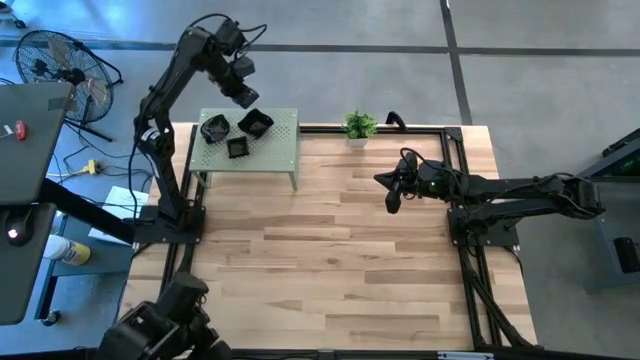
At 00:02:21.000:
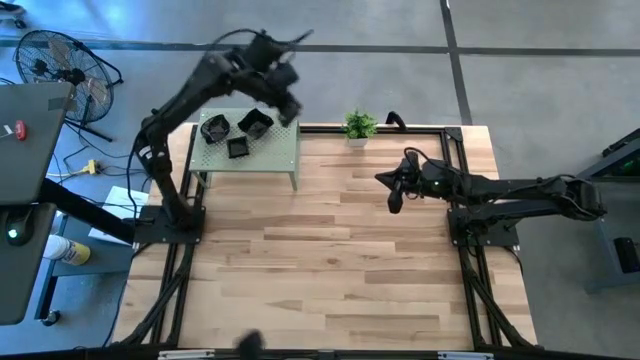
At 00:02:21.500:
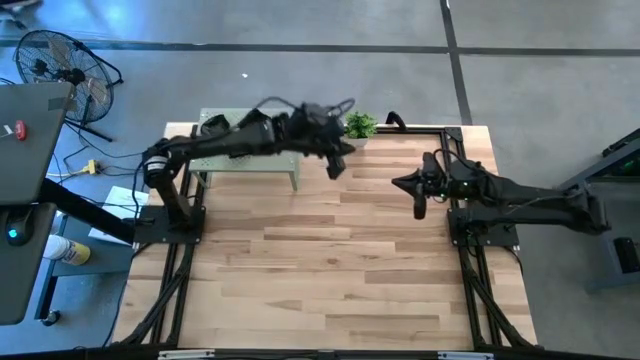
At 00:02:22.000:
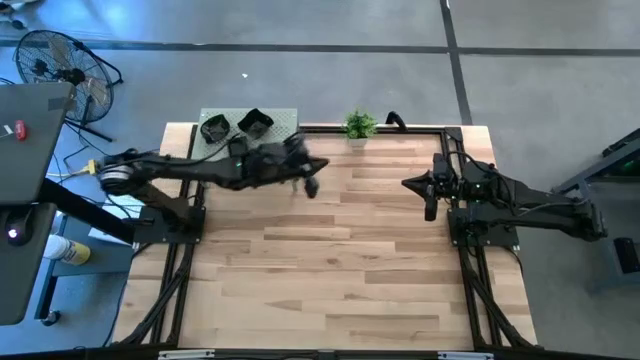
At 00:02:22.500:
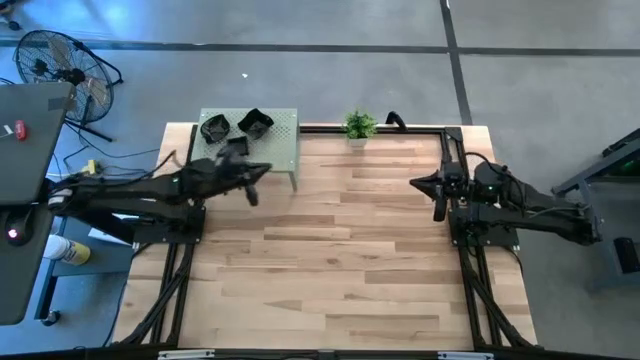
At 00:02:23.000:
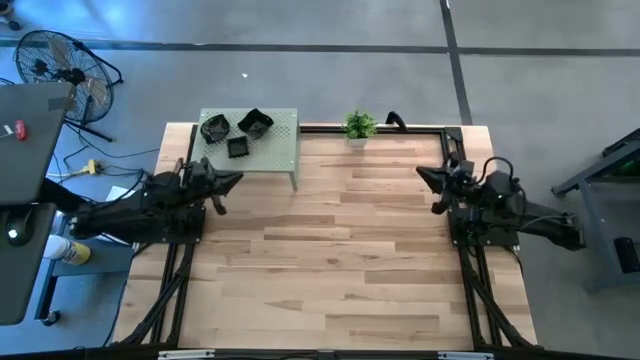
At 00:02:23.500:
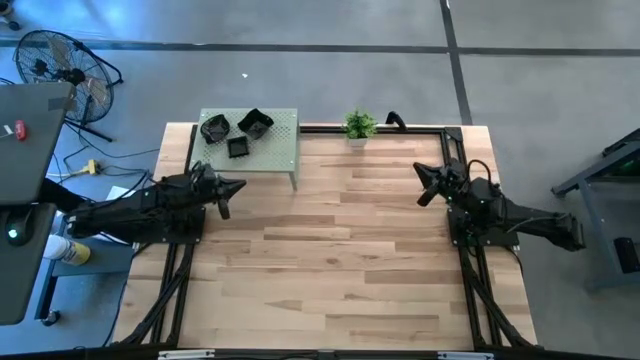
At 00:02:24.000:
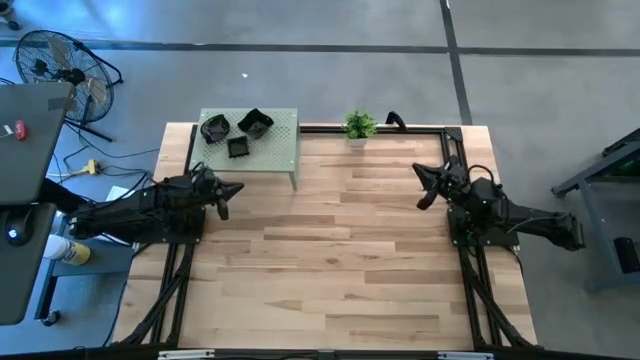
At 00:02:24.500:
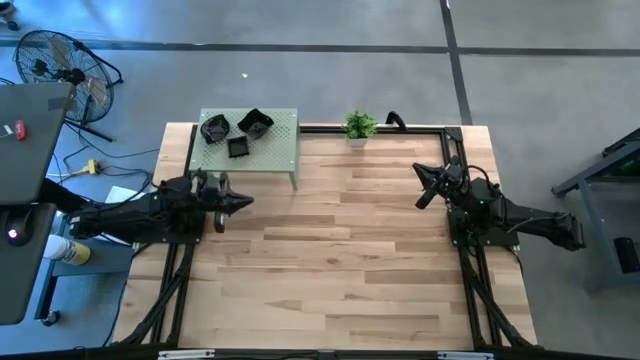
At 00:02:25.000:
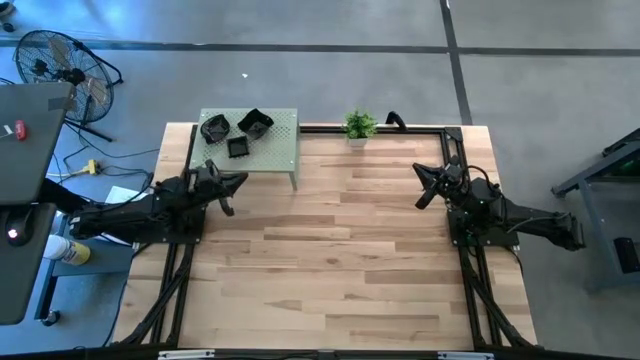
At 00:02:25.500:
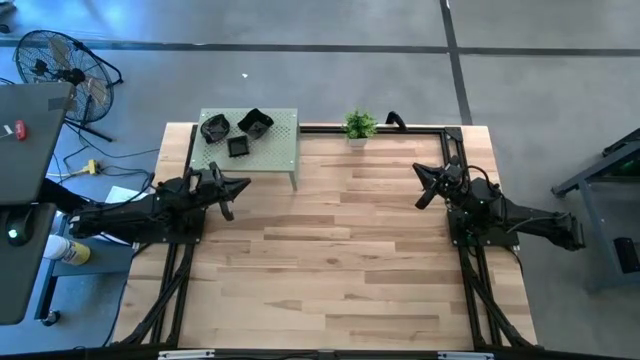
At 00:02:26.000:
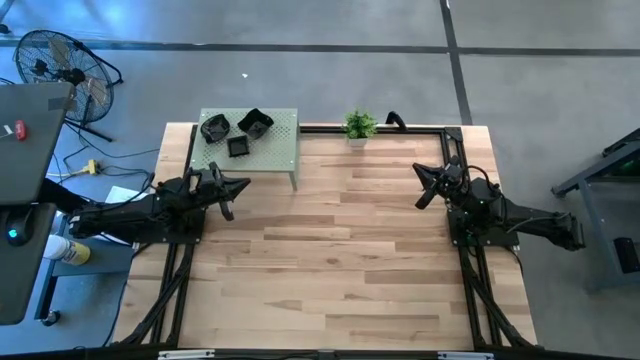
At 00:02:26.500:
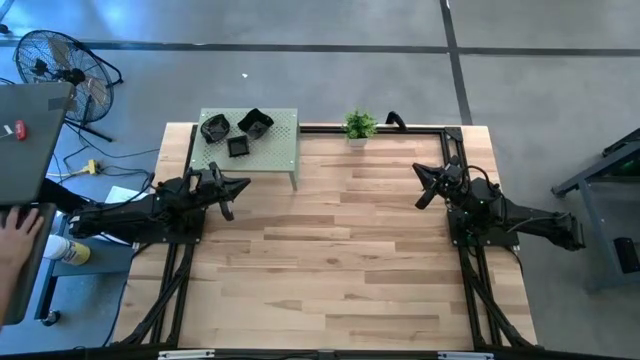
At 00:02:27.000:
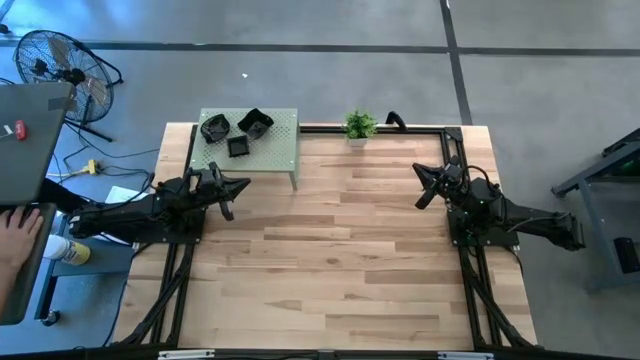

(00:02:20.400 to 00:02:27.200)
Task: Pick & Place Mini shaped plates
Return to Home Position

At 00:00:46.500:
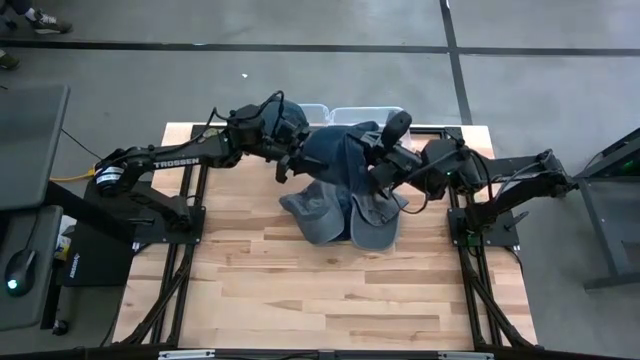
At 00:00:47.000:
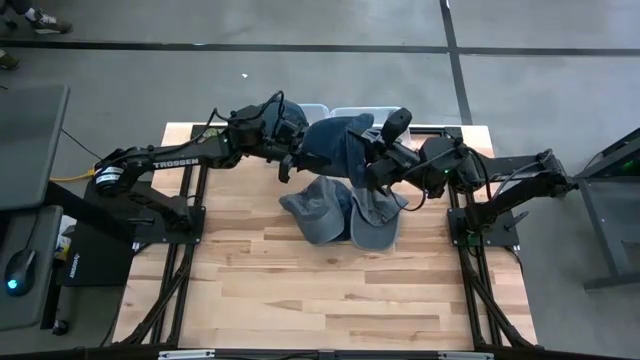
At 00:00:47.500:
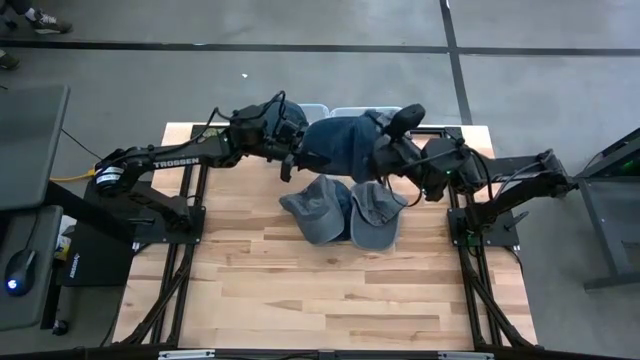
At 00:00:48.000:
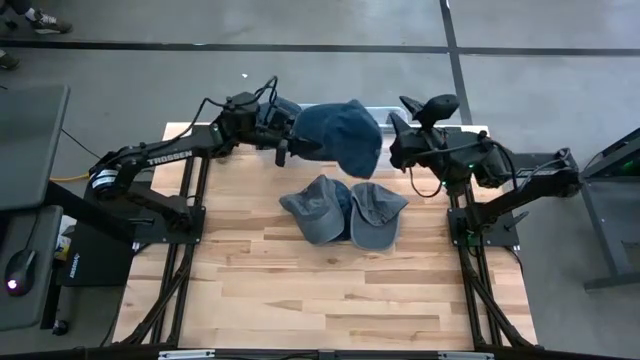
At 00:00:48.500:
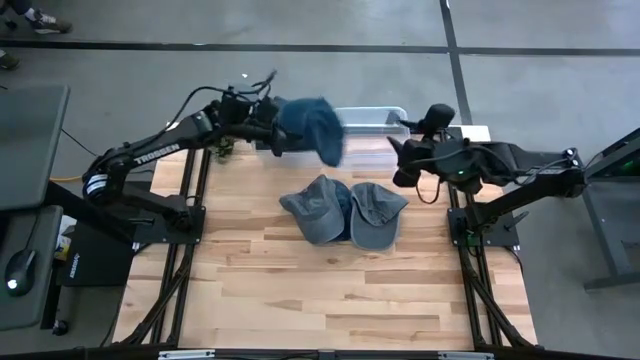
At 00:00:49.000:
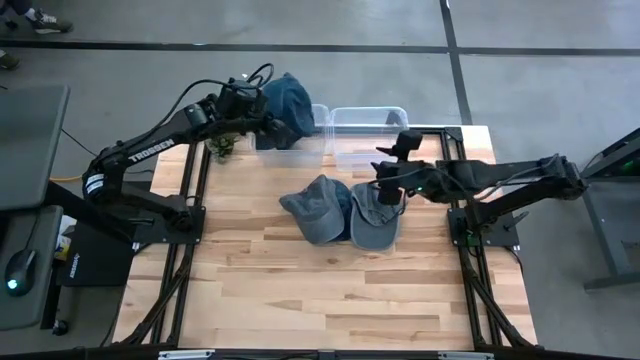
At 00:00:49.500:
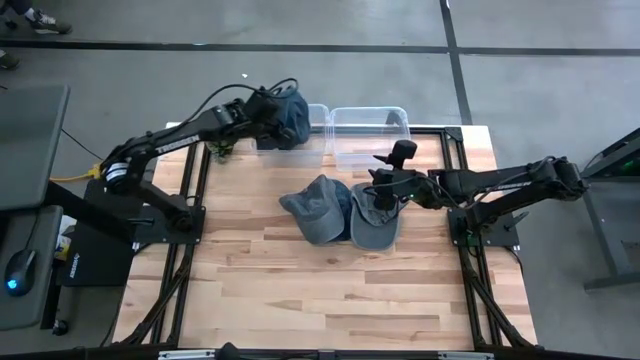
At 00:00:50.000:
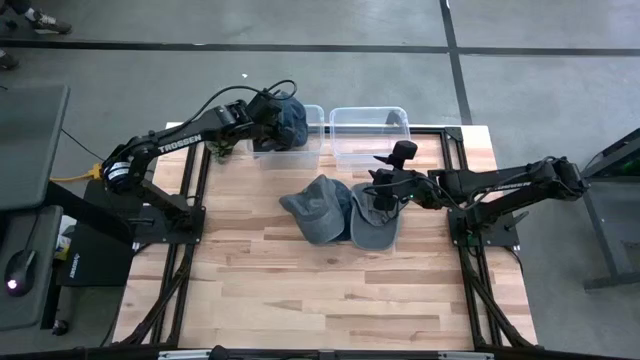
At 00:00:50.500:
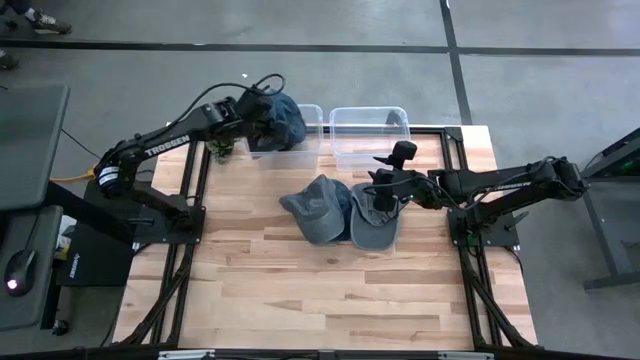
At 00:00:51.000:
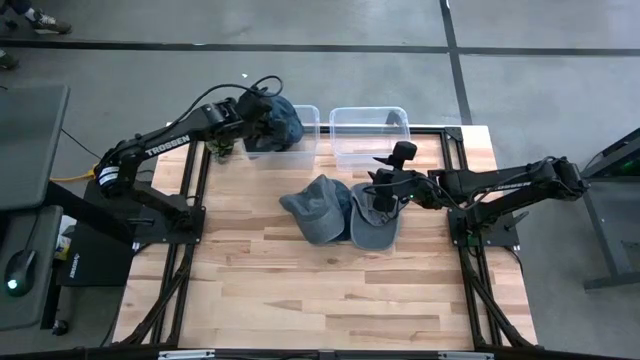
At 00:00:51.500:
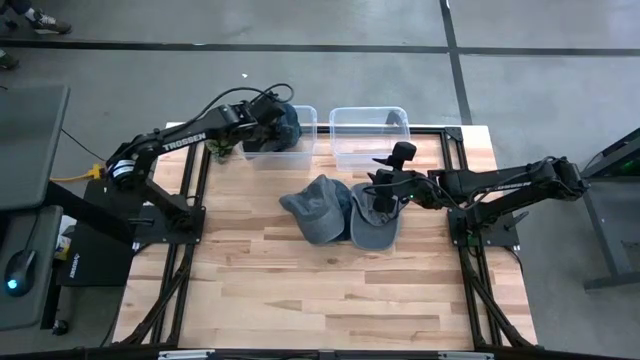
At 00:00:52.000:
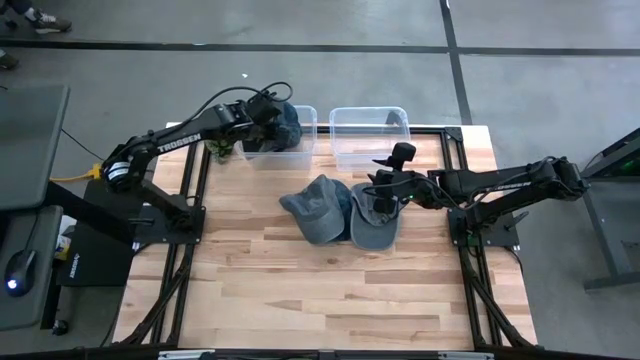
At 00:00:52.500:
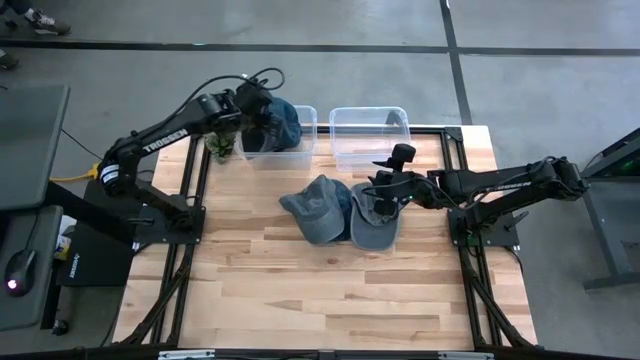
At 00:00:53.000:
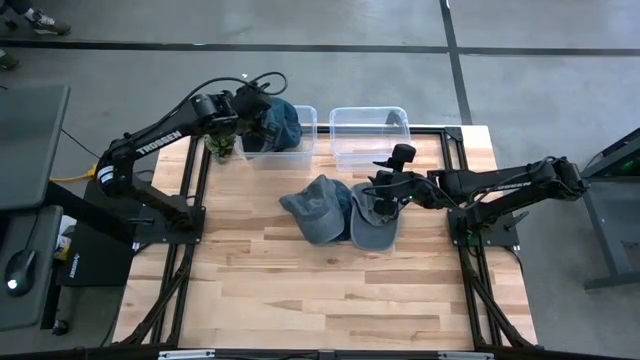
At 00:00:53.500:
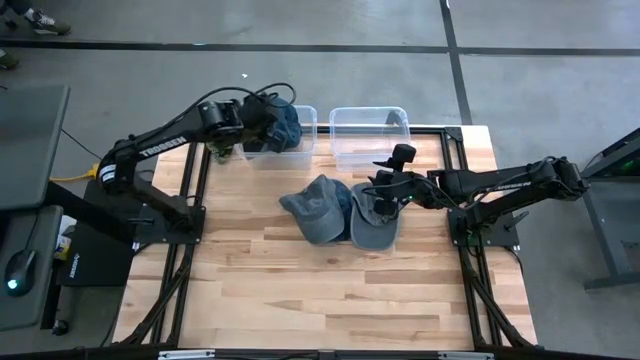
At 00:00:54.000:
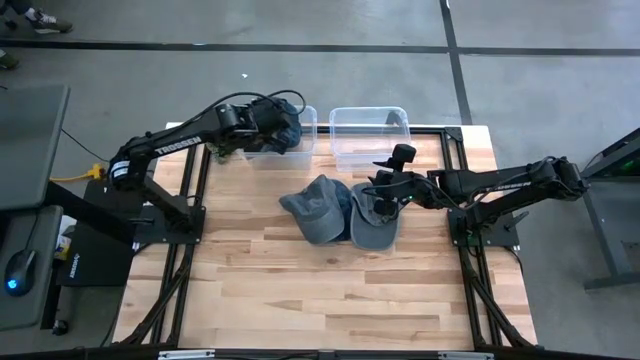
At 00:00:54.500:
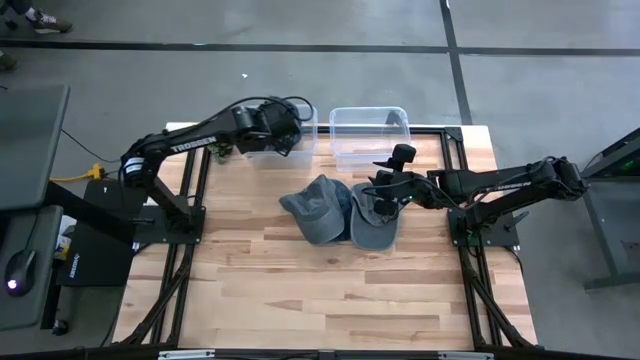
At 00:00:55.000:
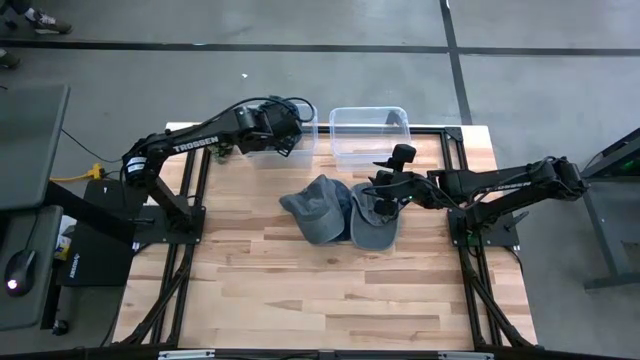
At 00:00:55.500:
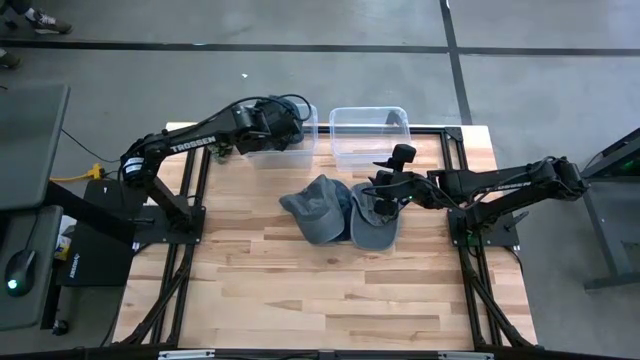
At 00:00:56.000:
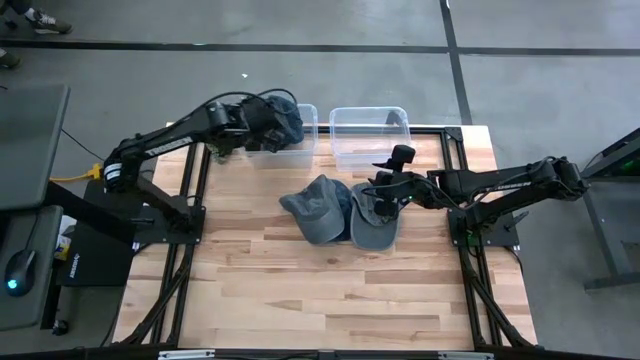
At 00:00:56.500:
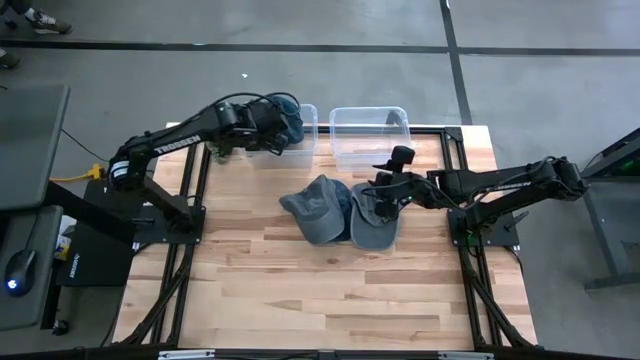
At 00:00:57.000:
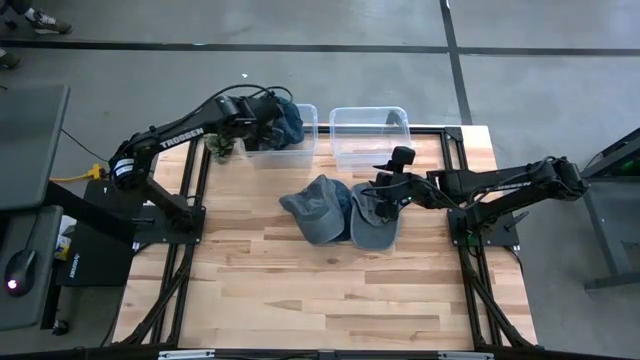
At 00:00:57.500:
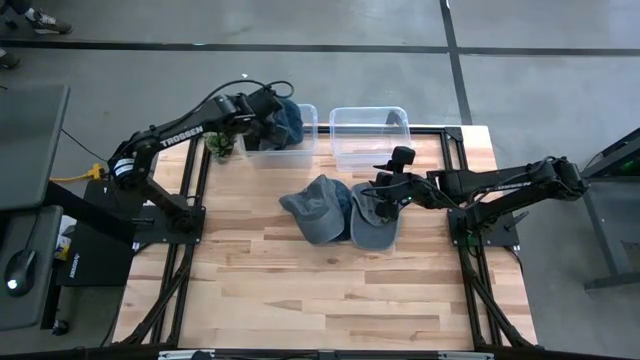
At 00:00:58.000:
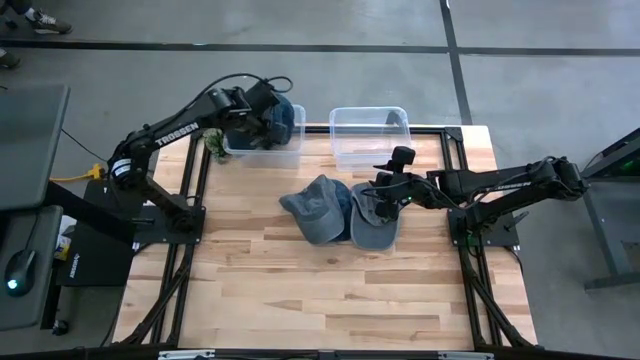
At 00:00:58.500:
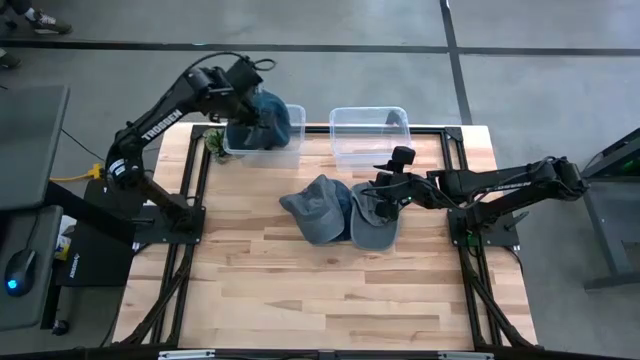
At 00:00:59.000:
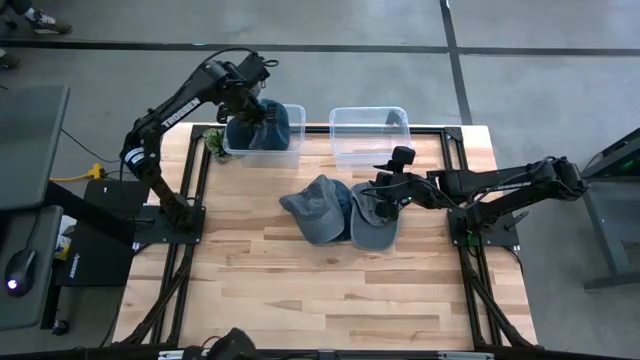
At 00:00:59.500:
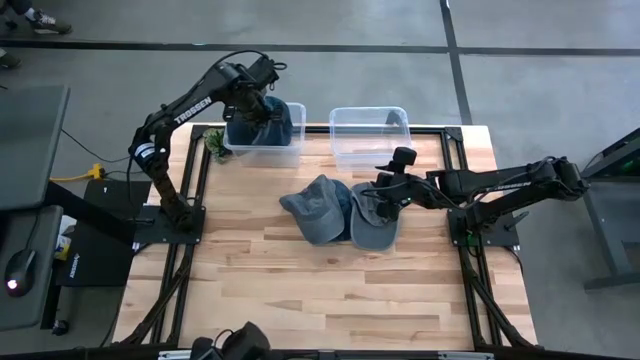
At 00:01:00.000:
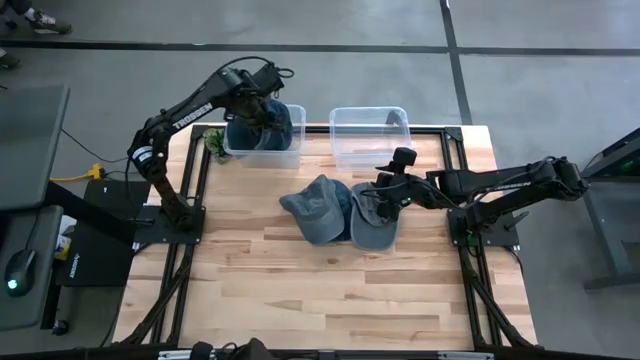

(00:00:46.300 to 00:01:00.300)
Task: Pick & Place hat
Put the middle left blue cap into the left transparent bin
